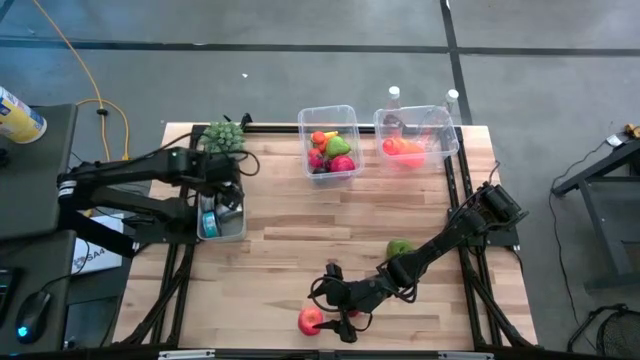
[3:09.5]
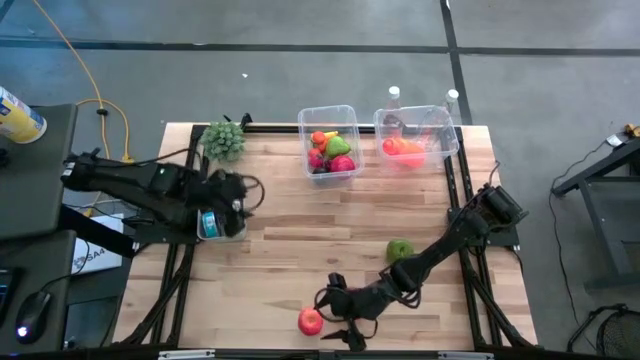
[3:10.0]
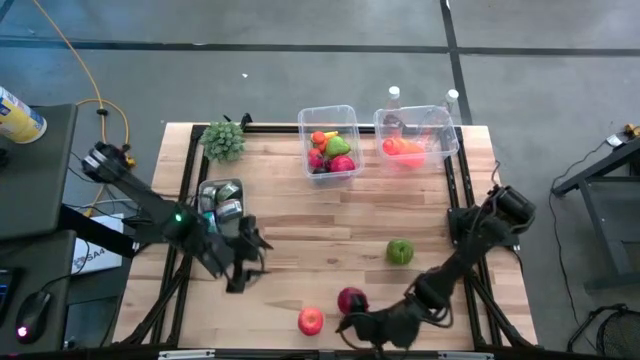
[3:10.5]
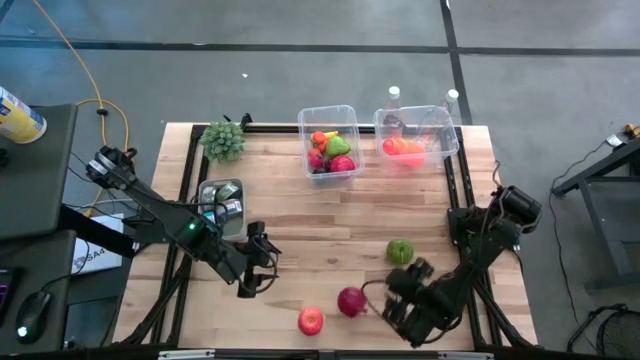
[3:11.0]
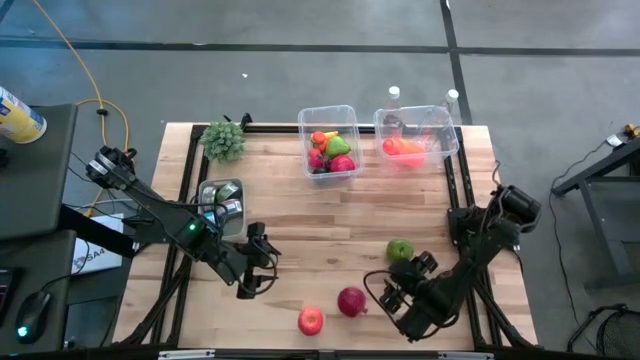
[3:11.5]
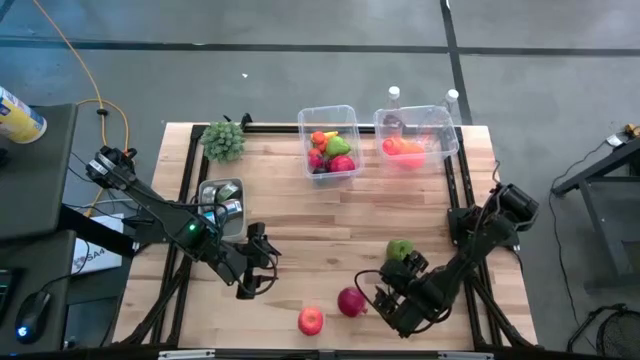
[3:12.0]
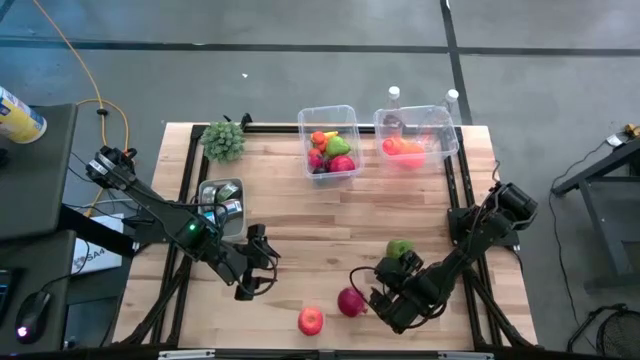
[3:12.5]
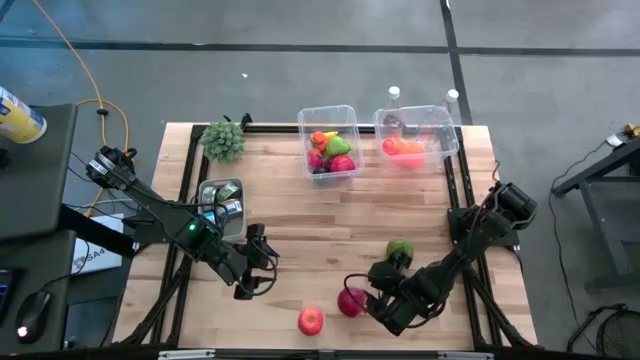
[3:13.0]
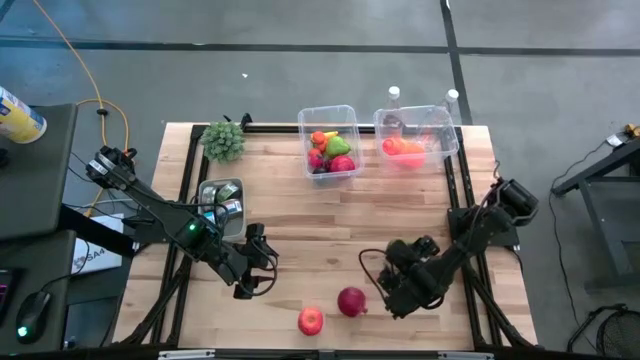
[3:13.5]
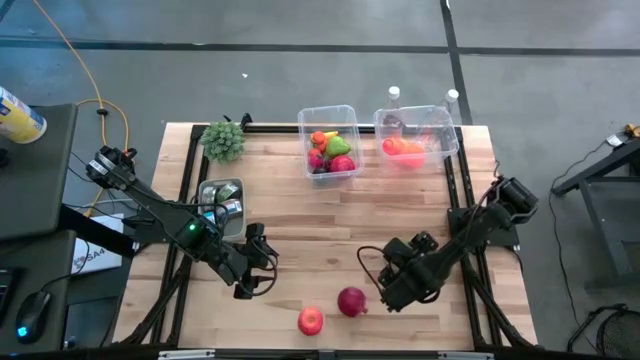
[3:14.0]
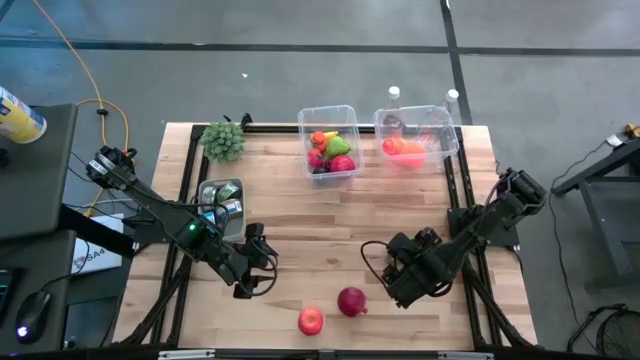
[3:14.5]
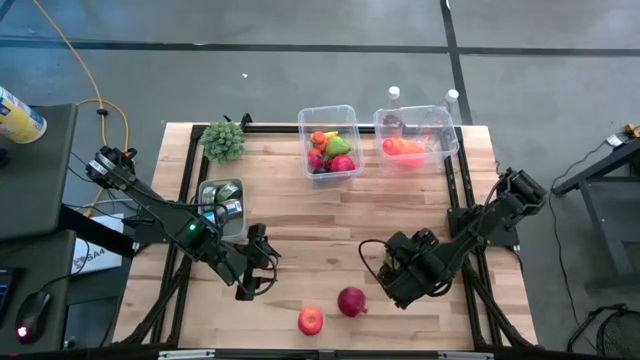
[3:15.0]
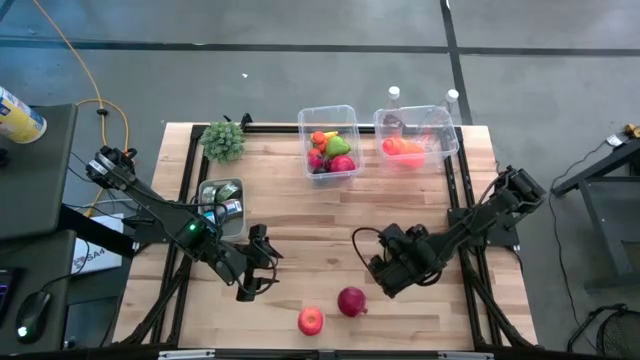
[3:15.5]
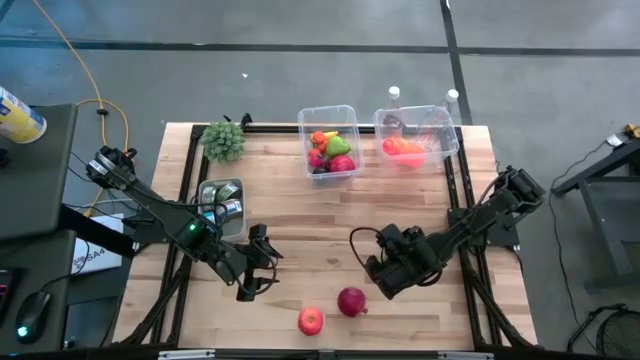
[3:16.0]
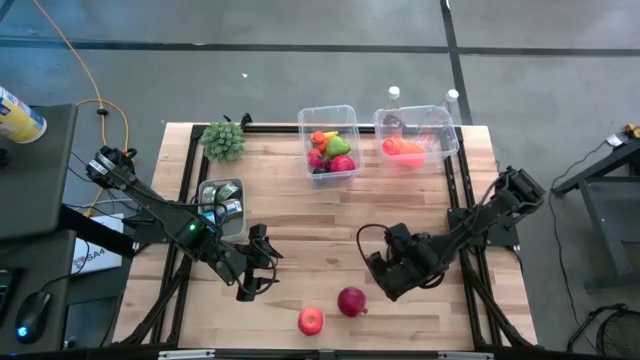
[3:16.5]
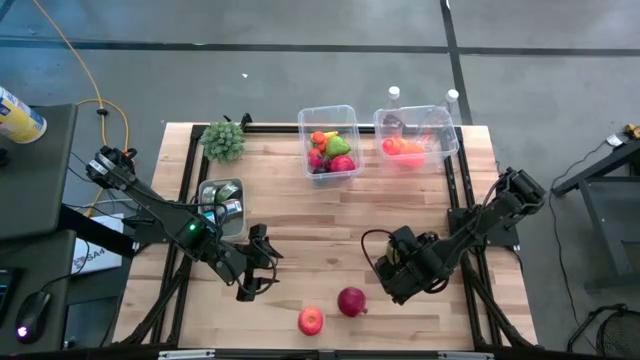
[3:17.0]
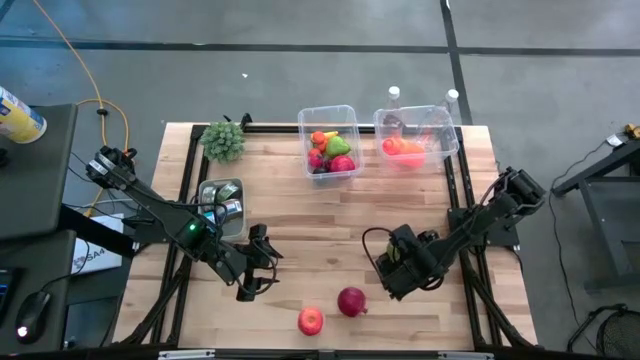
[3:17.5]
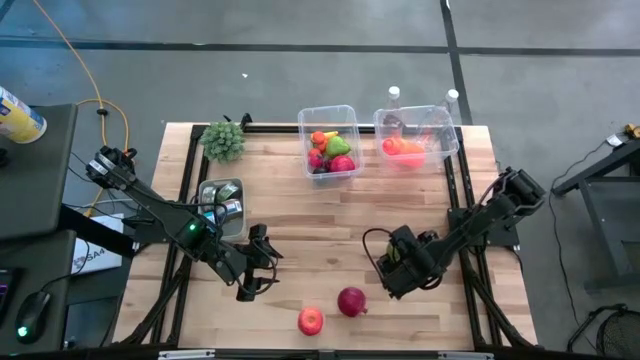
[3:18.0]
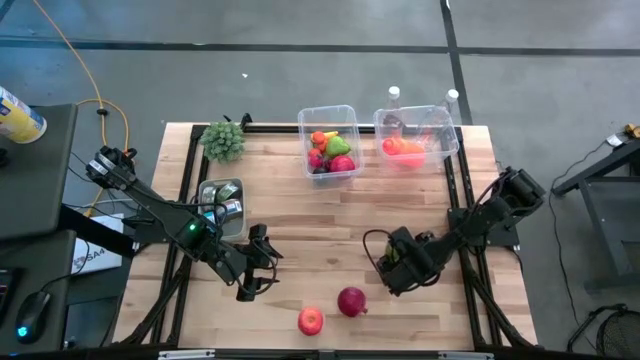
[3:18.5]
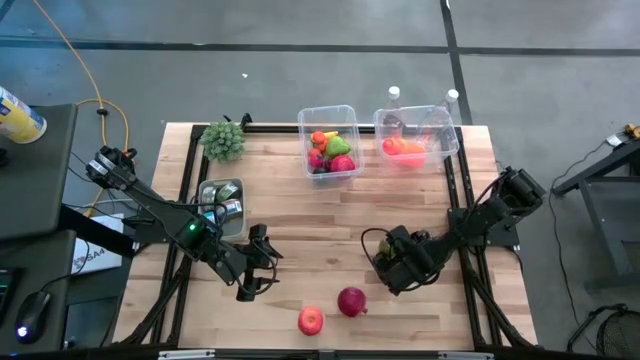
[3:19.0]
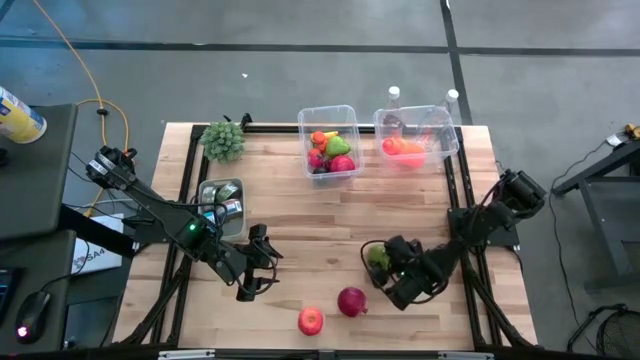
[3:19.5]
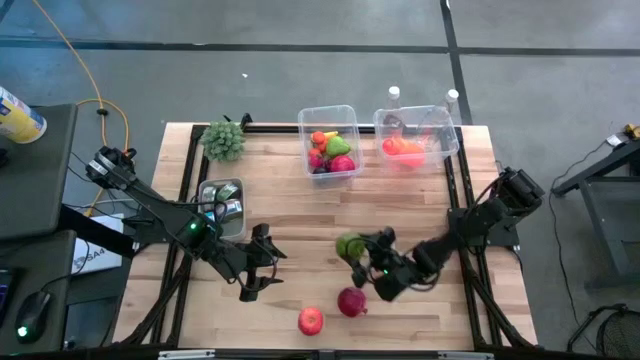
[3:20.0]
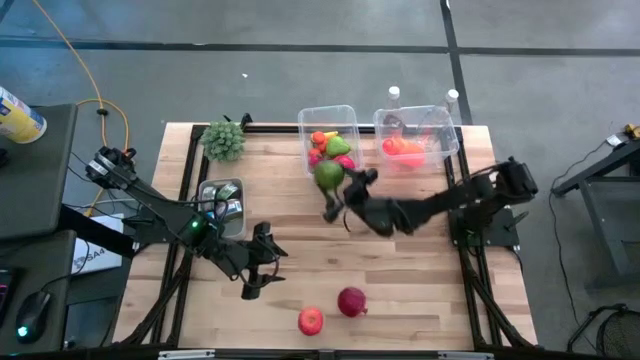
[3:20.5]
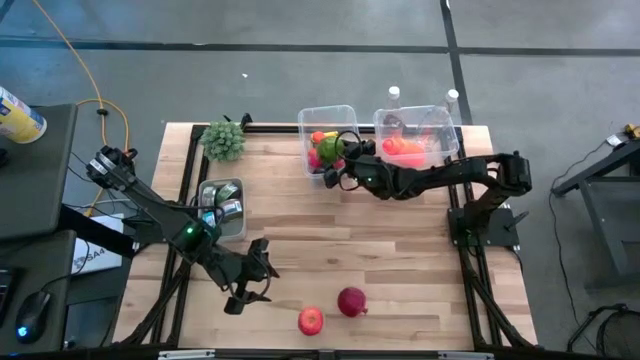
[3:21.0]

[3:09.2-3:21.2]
Task: Pick & Place Food Item
Put the green apple into the left transparent bin

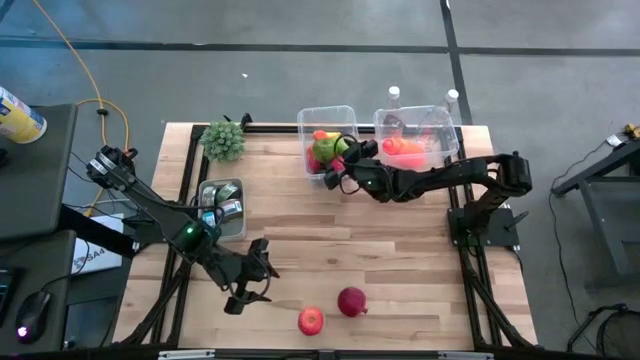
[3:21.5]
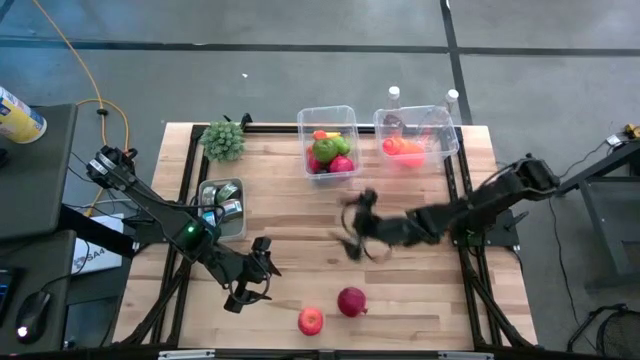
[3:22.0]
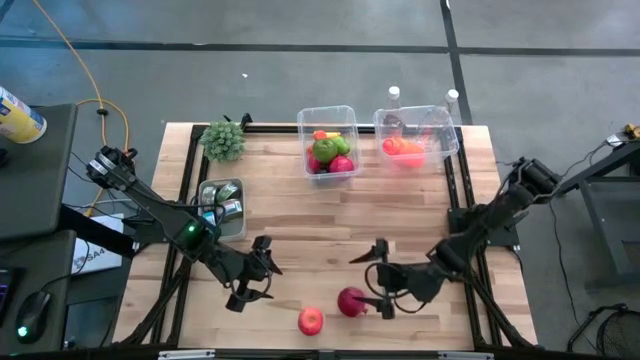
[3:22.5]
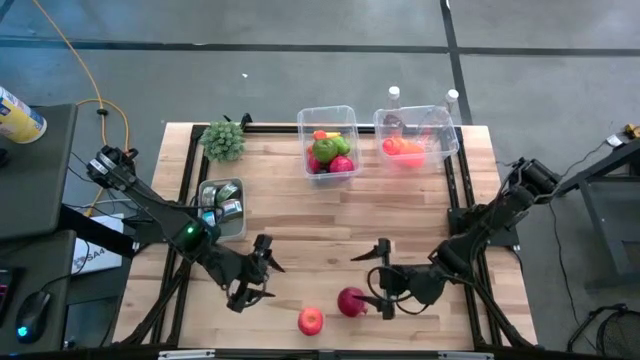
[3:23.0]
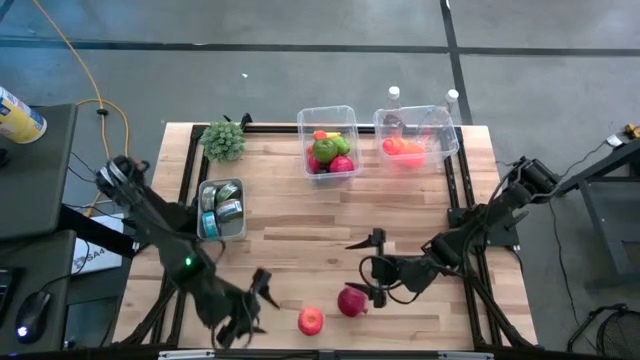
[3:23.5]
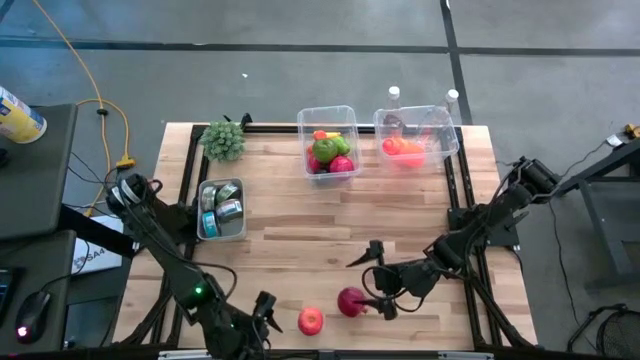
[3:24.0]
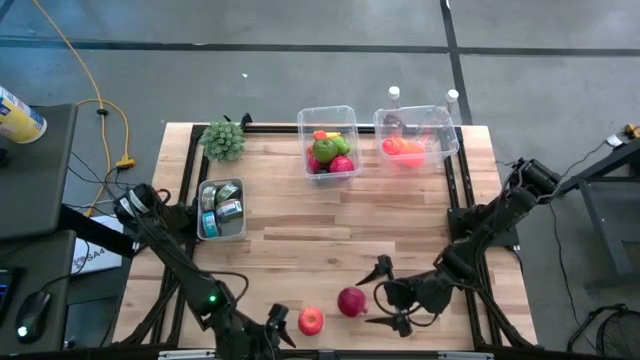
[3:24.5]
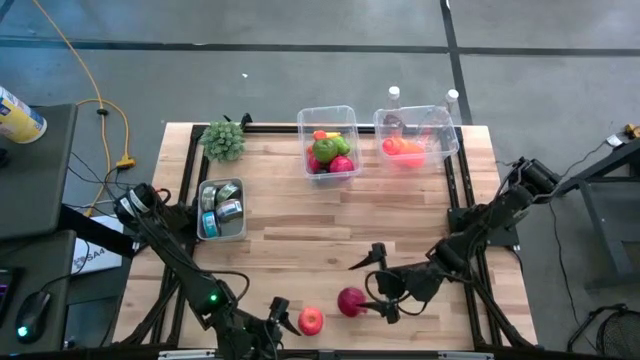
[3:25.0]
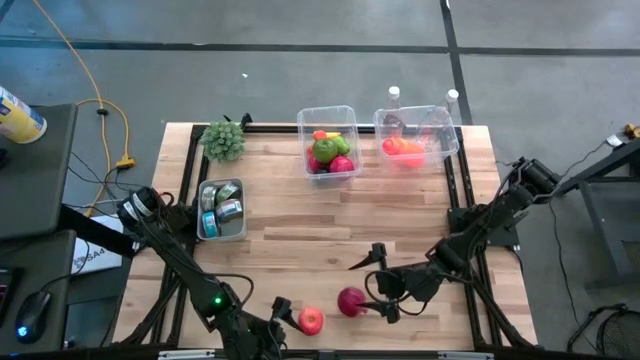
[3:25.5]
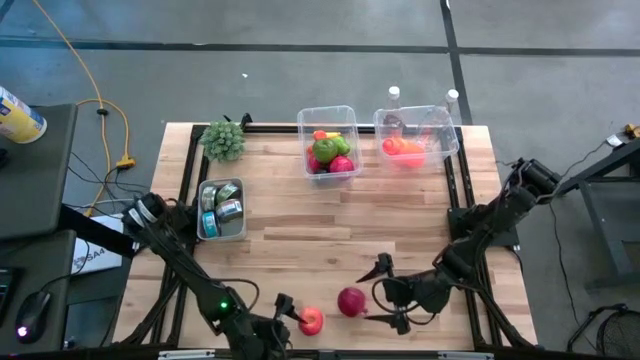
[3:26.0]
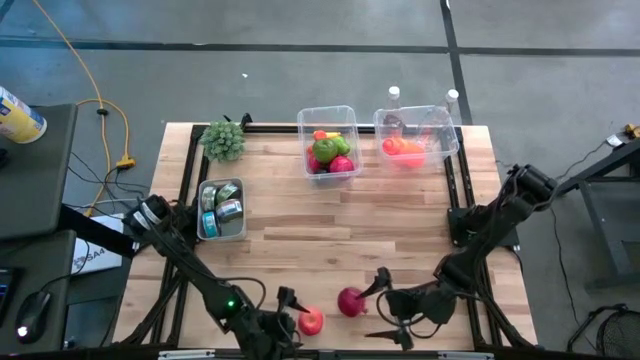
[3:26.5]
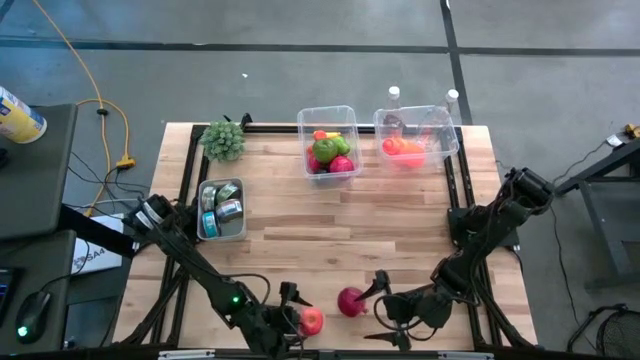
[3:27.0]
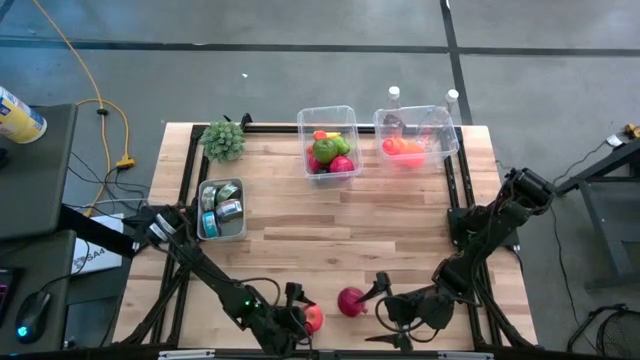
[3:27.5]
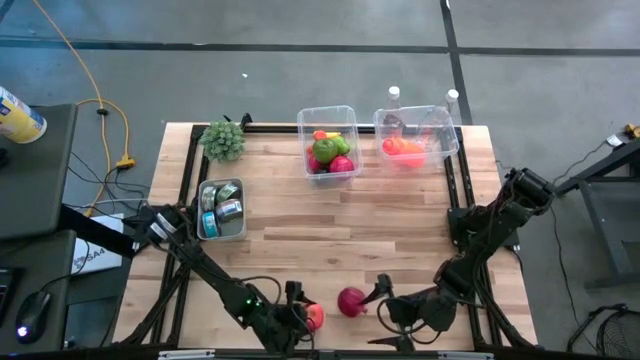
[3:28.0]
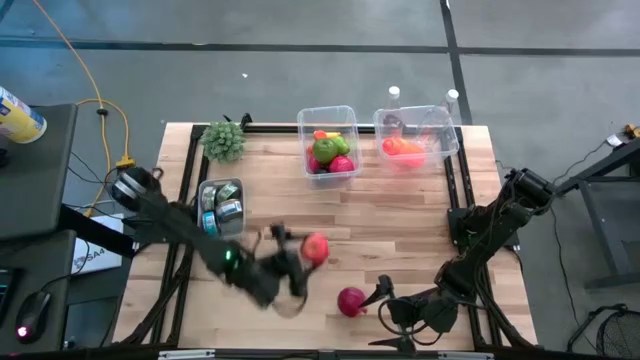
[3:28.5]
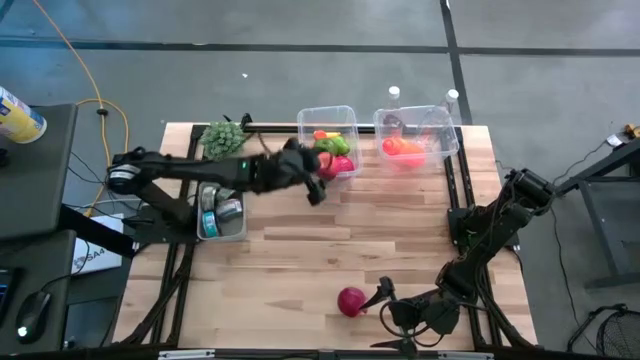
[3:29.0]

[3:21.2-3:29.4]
Put the red apple into the left transparent bin

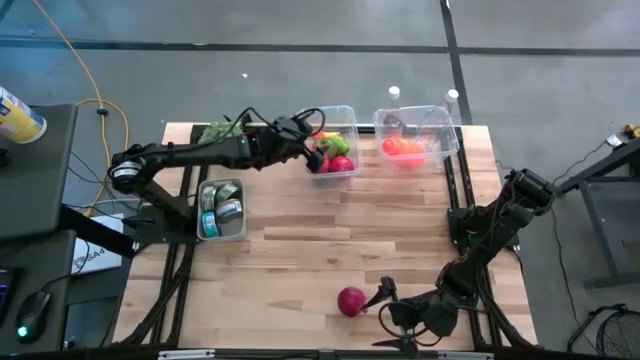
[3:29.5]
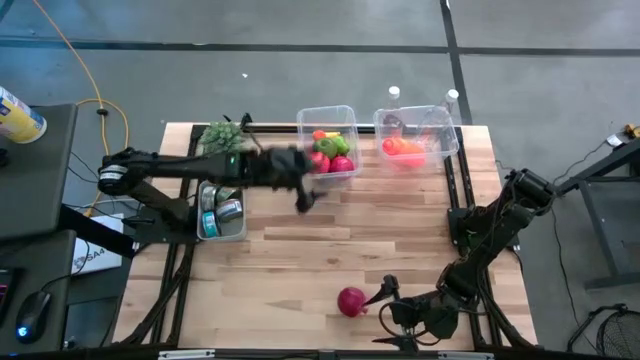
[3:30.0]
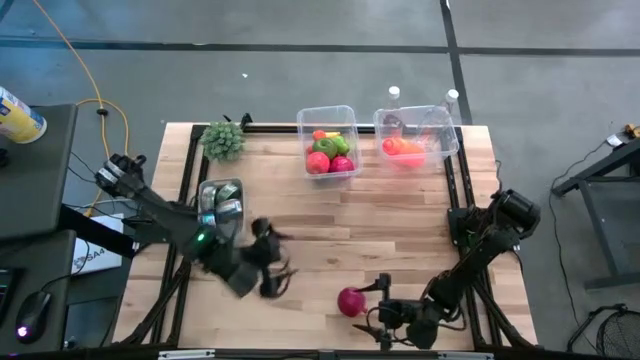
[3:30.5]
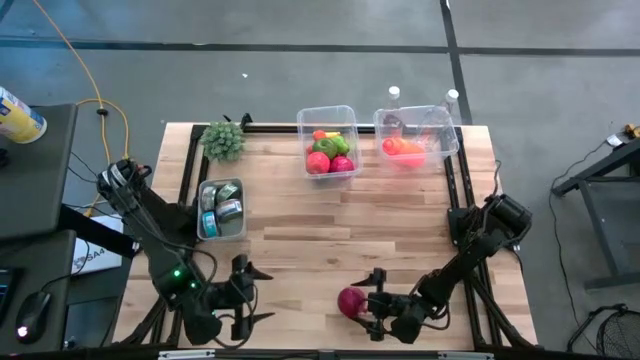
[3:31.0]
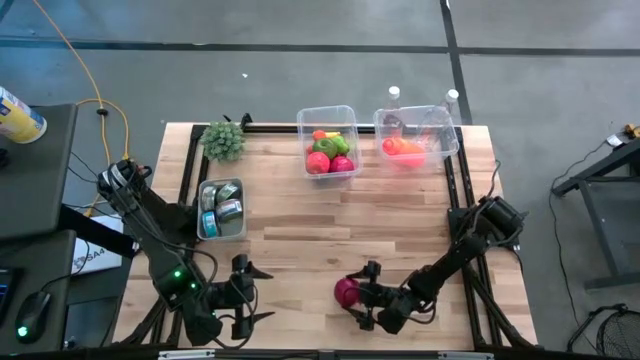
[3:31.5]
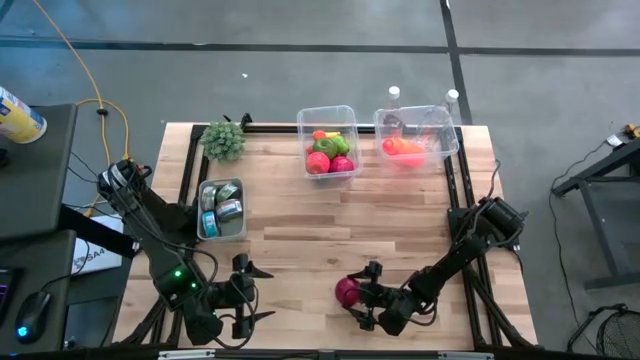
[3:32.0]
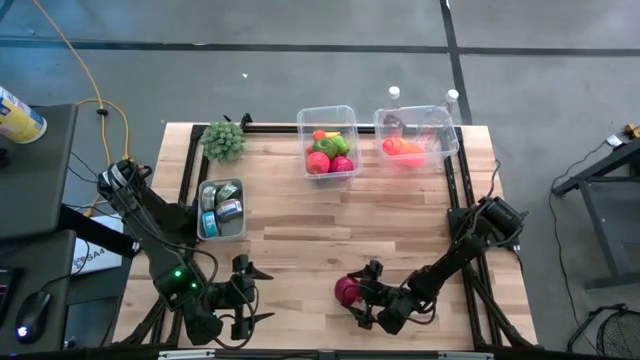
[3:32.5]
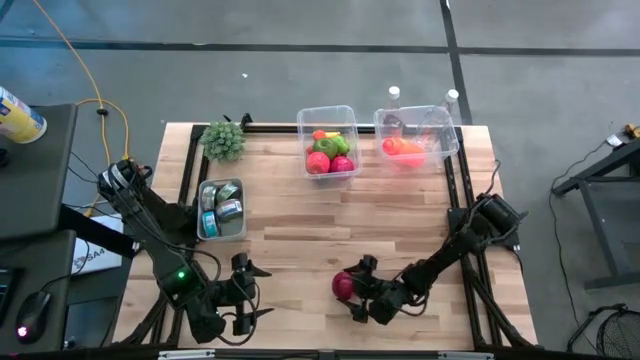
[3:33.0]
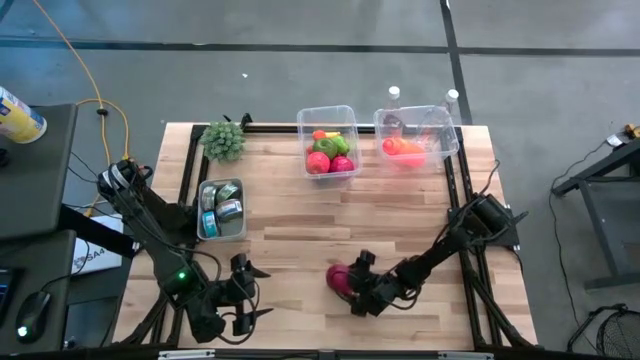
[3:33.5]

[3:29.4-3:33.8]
Put the pomegranate into the left transparent bin
